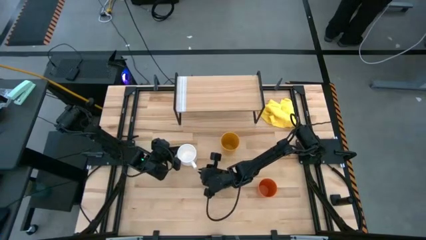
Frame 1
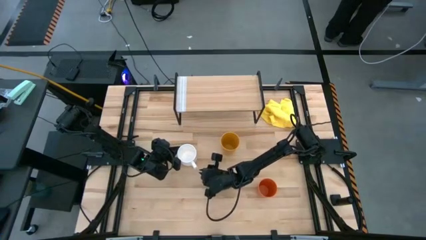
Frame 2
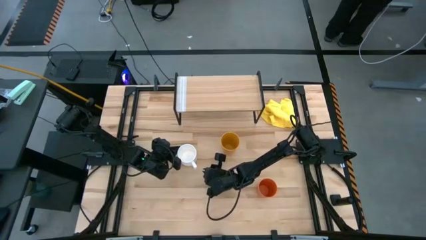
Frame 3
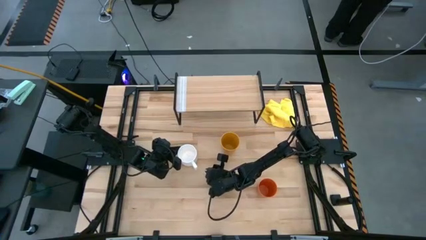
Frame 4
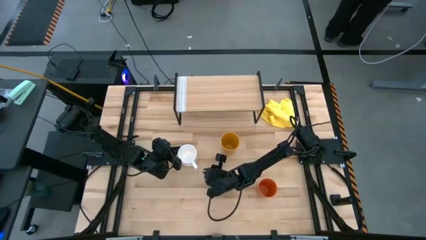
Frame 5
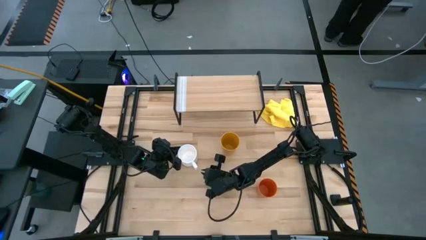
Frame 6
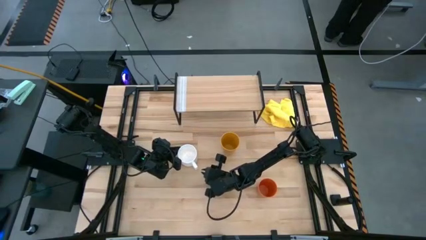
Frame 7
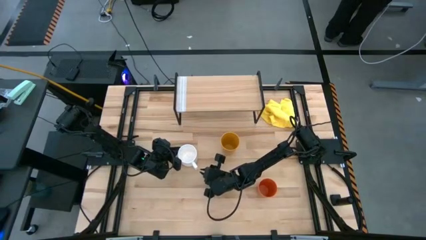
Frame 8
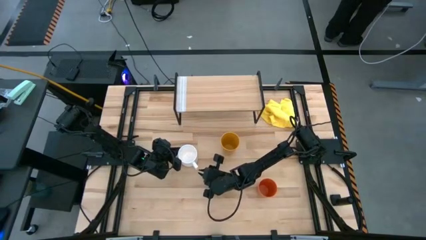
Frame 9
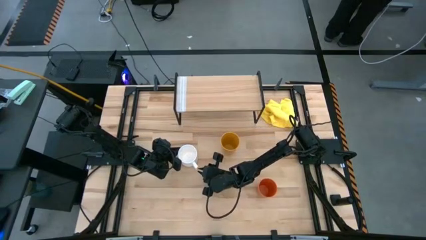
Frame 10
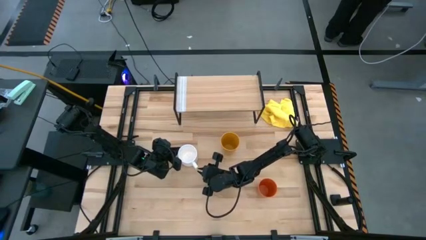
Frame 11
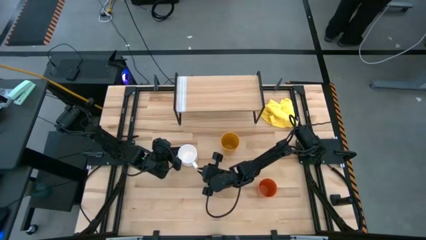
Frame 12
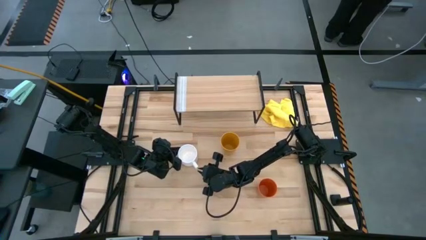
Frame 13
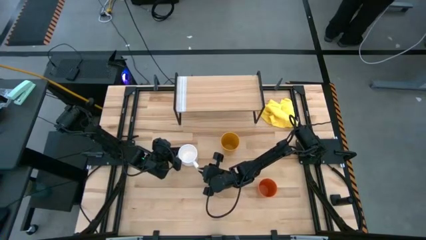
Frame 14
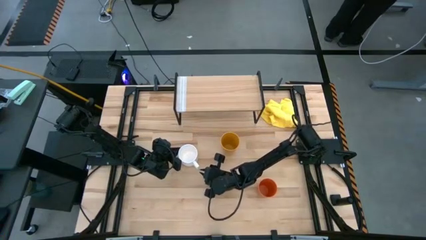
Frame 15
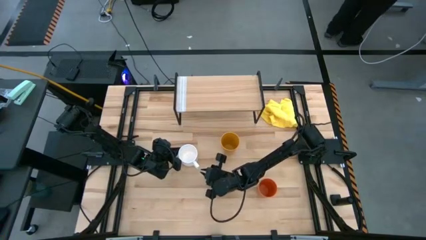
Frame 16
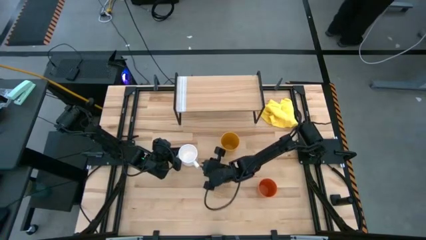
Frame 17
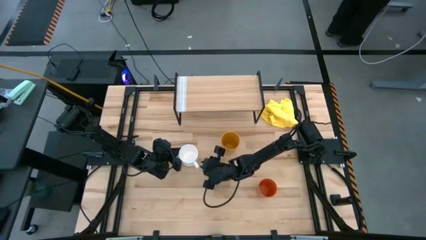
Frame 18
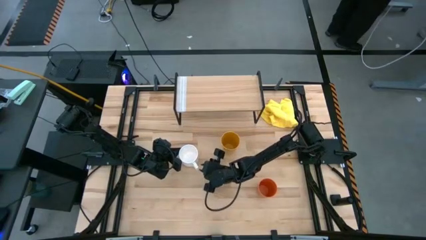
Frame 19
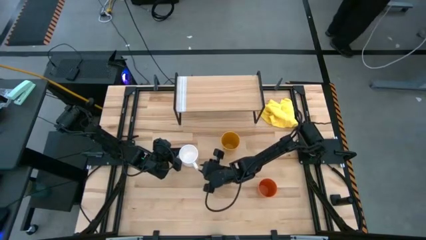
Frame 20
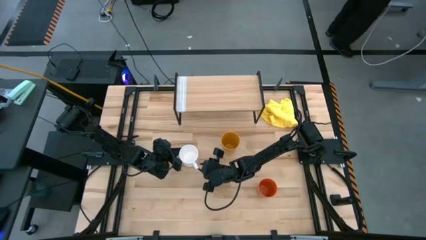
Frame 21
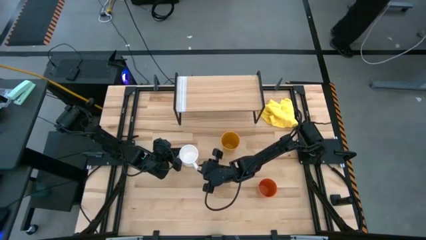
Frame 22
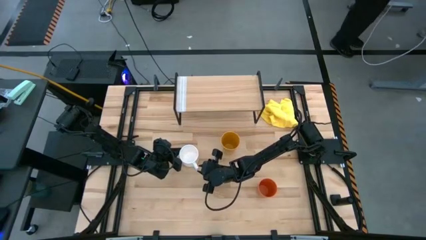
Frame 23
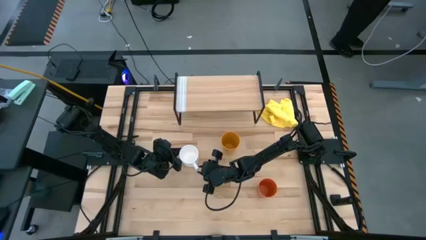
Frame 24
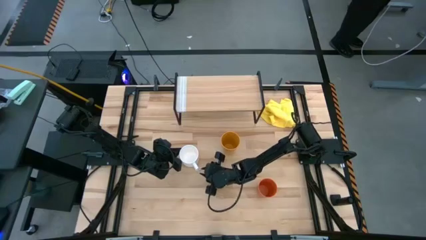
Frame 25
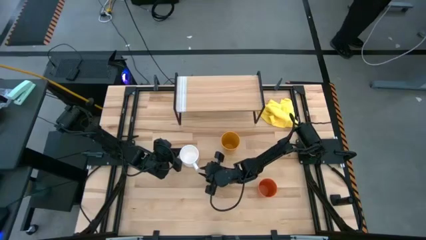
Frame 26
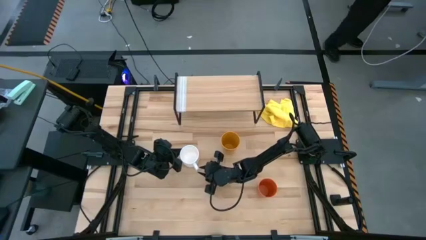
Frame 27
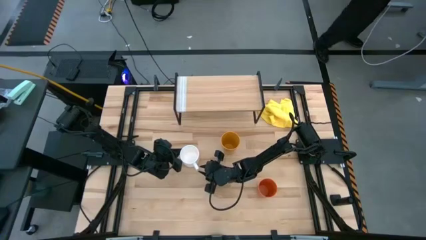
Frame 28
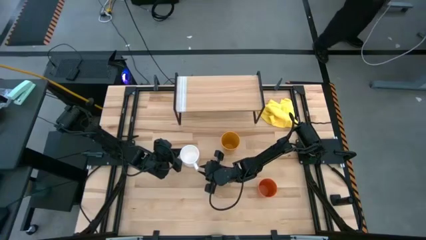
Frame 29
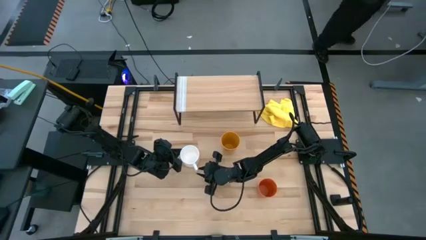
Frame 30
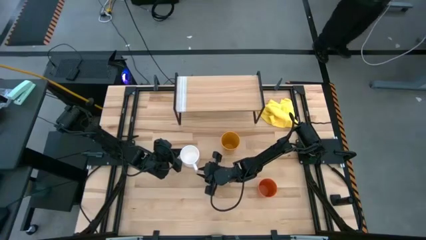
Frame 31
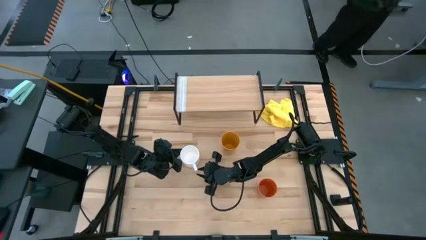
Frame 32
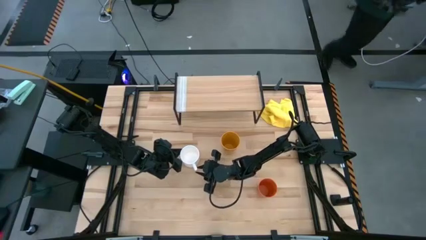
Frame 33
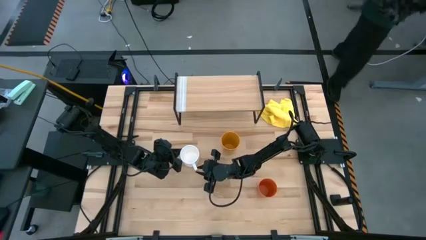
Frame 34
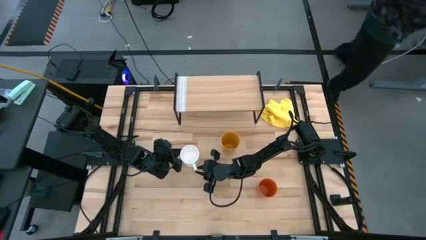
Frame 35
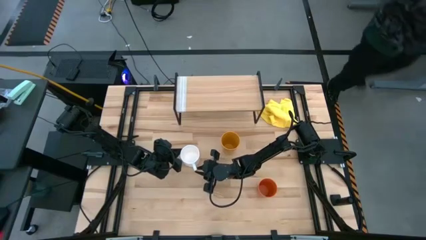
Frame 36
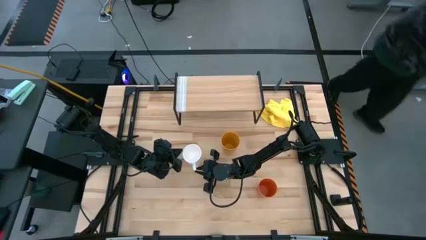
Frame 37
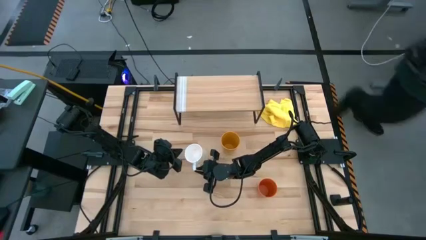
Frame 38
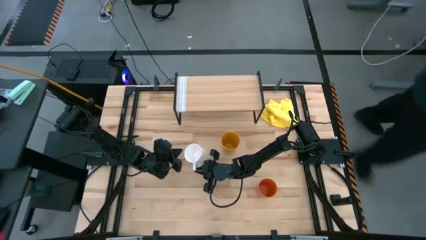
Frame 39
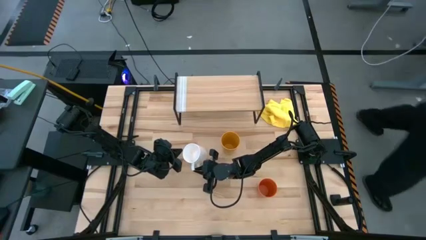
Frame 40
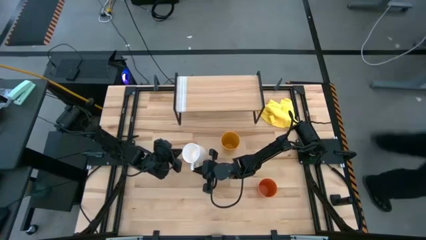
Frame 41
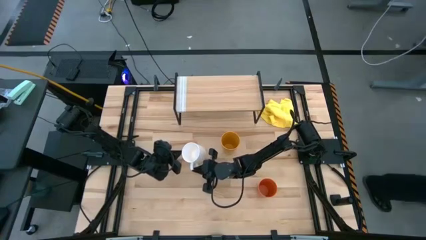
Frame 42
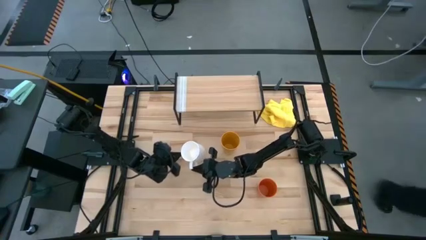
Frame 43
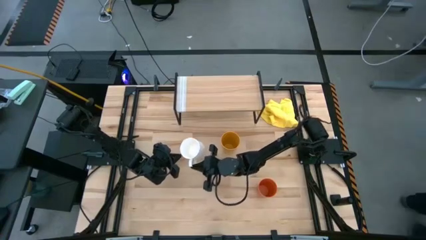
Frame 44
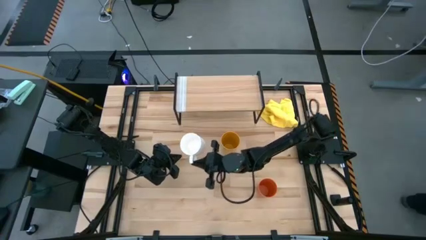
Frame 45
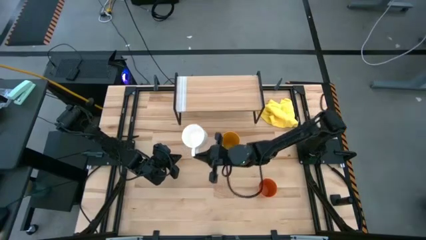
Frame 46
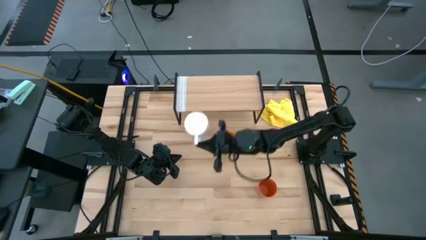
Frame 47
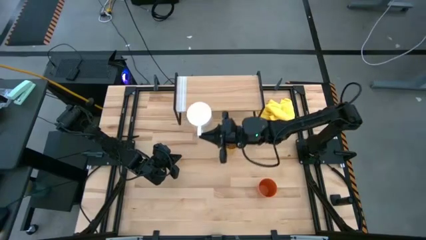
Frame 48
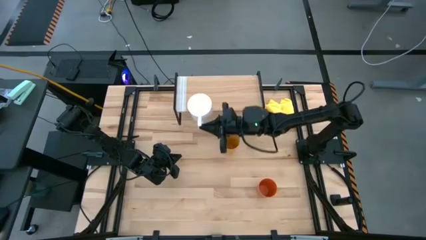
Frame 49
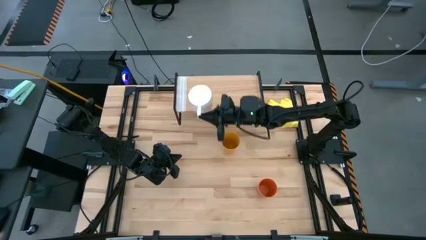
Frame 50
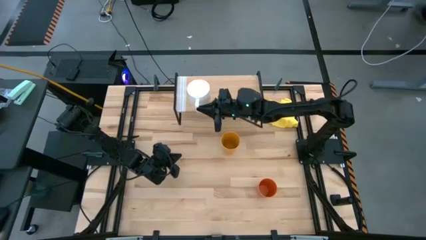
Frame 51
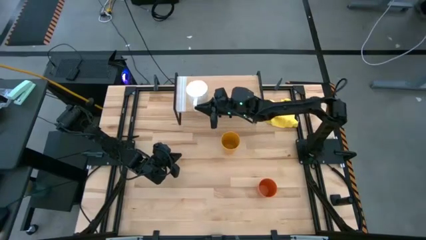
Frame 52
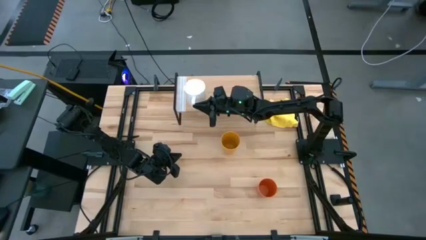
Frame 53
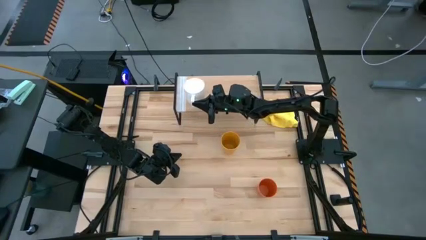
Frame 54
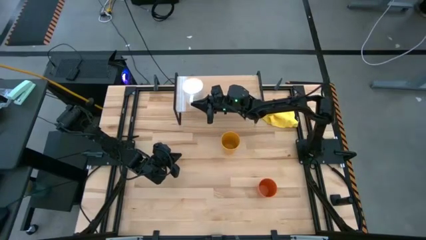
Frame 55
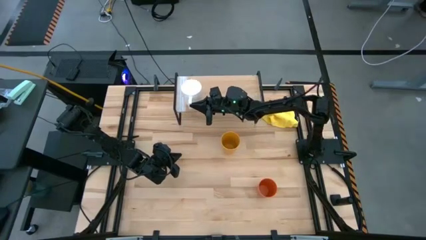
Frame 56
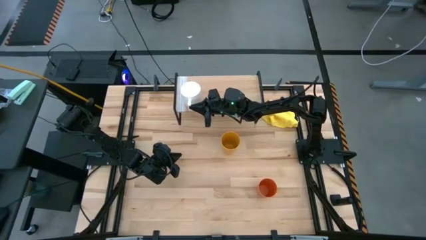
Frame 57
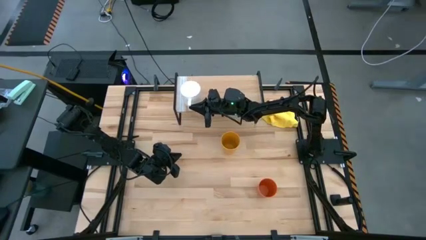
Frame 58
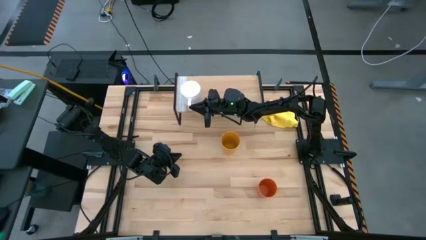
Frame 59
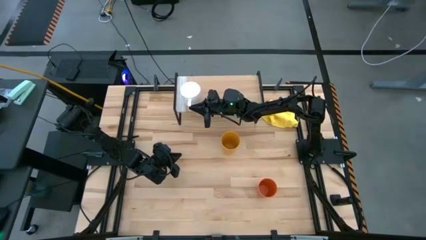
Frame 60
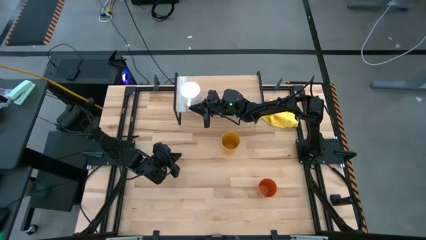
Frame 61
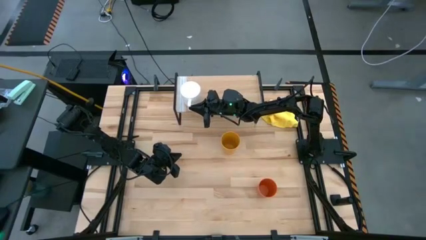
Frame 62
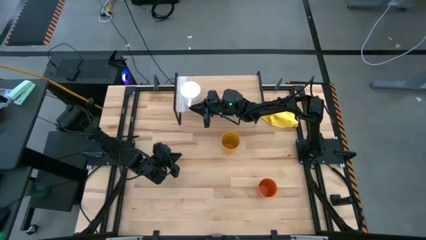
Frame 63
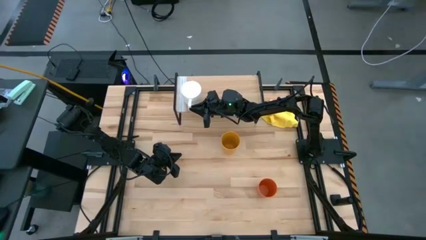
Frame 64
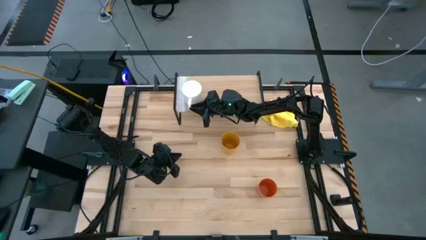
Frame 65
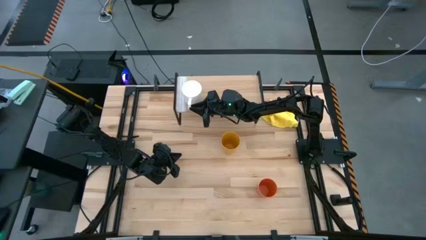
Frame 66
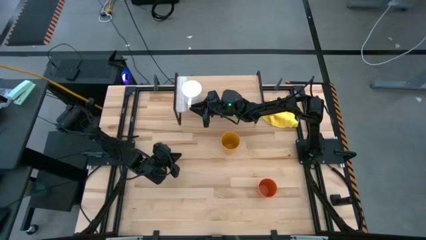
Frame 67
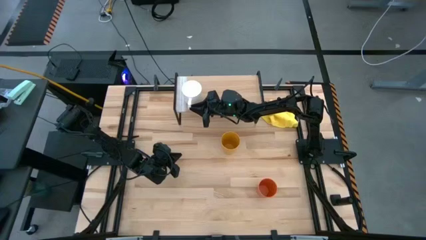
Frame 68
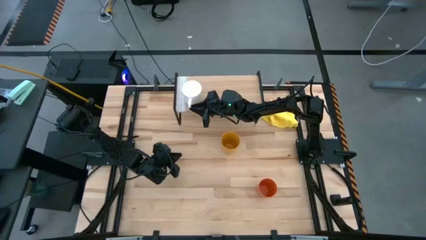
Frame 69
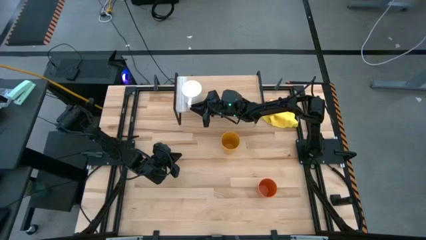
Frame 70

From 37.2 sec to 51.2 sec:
Task: Stack small to large cups/mugs on shelf
Put the white mug on the shelf
